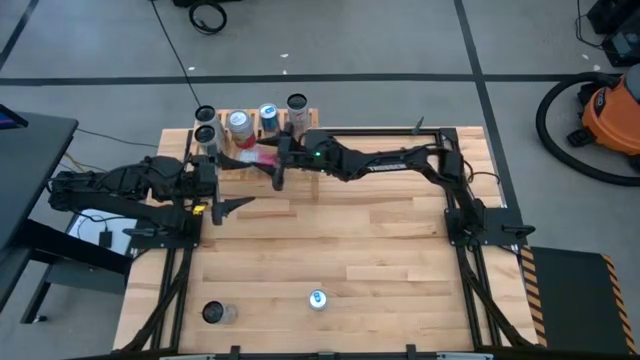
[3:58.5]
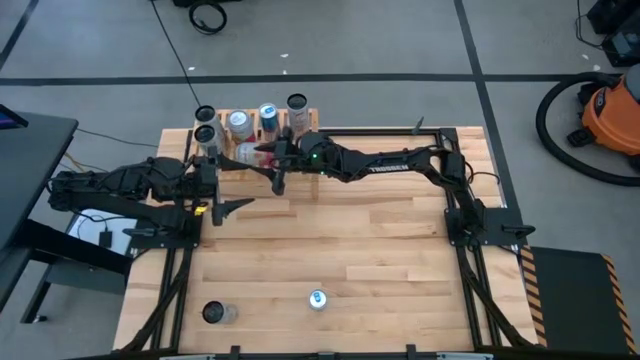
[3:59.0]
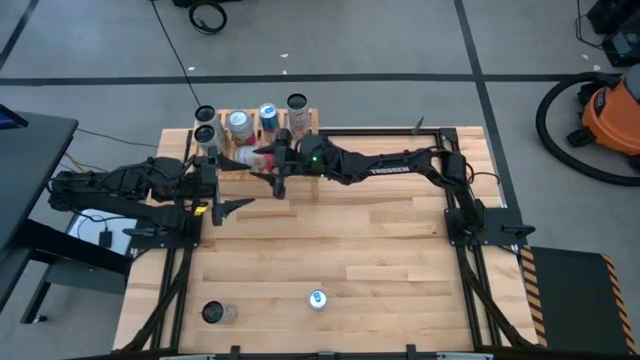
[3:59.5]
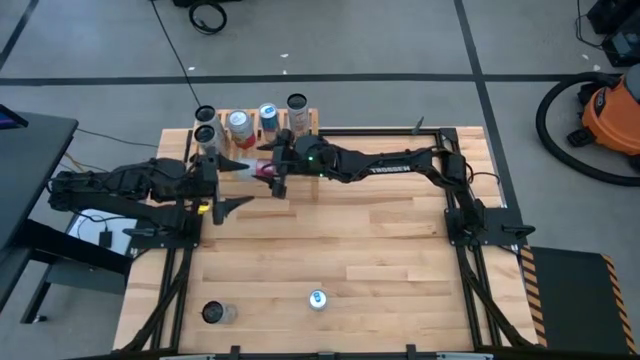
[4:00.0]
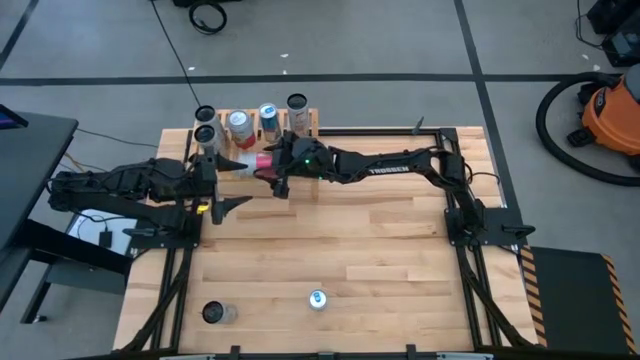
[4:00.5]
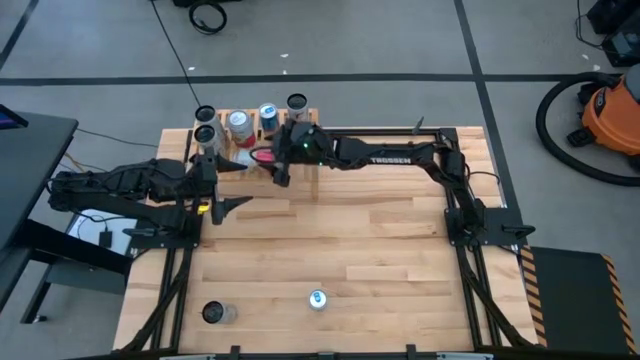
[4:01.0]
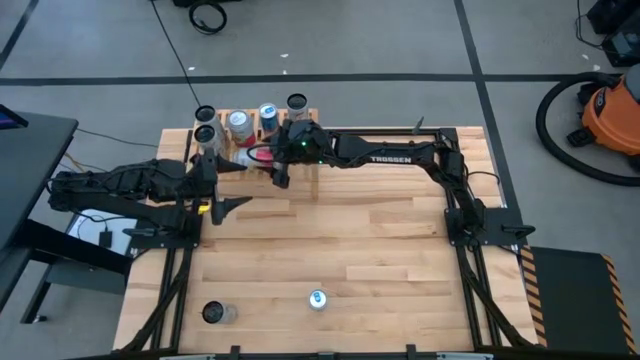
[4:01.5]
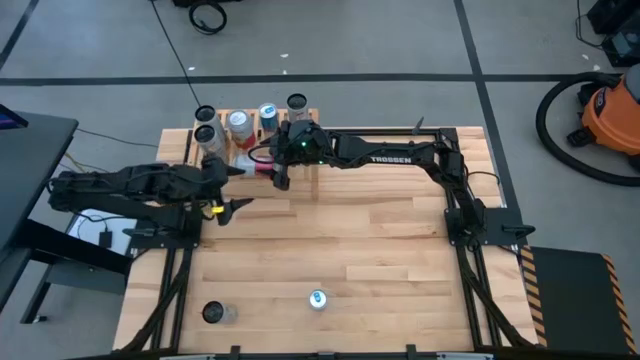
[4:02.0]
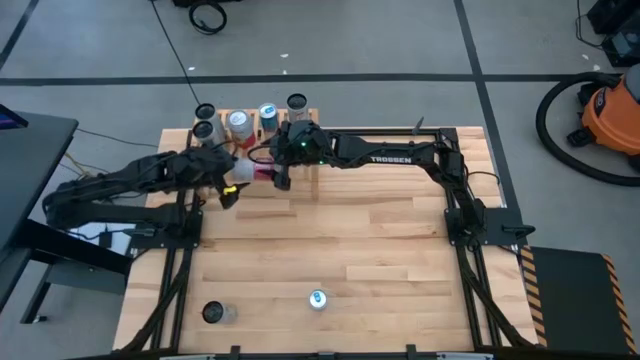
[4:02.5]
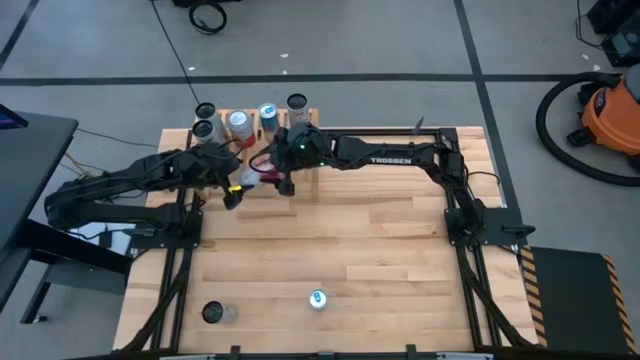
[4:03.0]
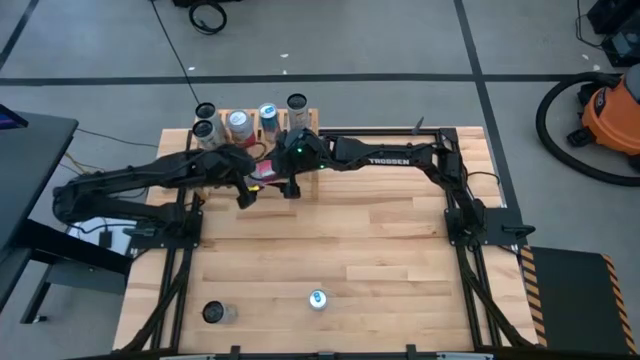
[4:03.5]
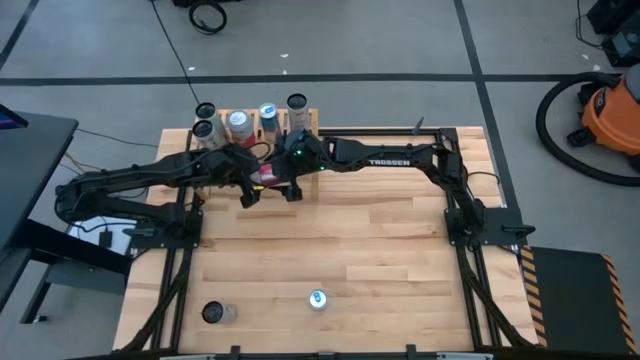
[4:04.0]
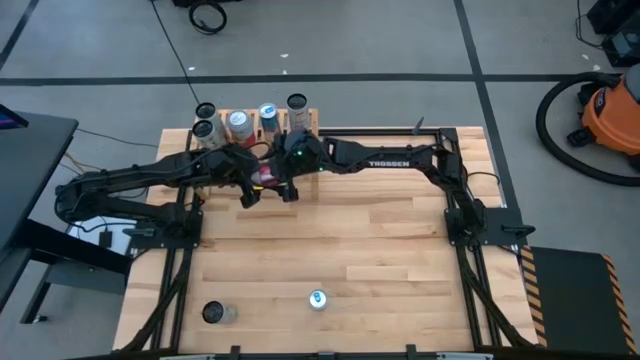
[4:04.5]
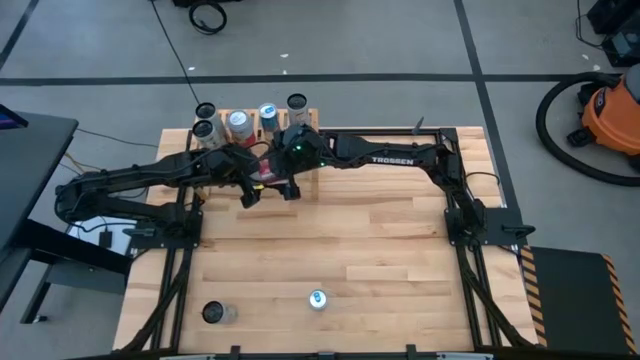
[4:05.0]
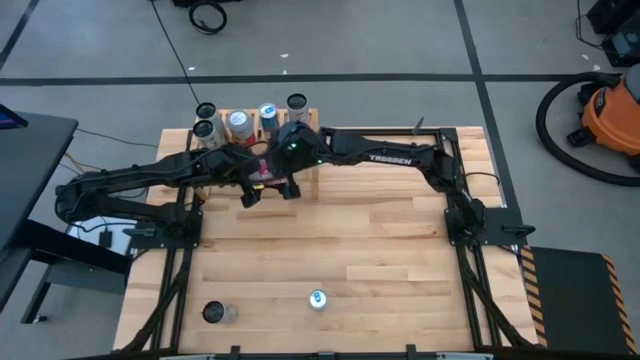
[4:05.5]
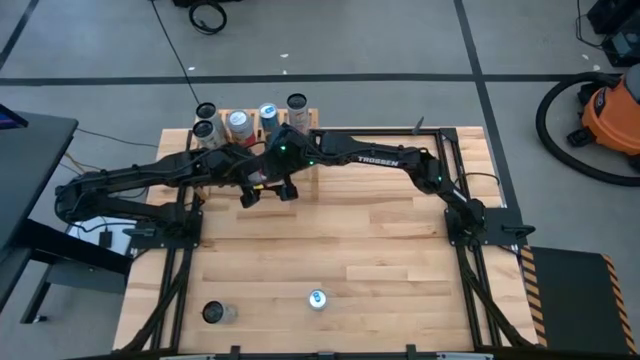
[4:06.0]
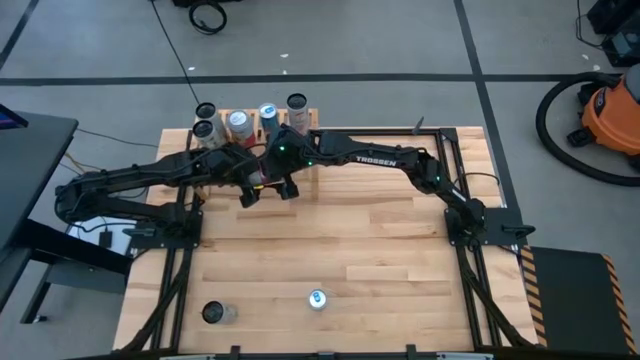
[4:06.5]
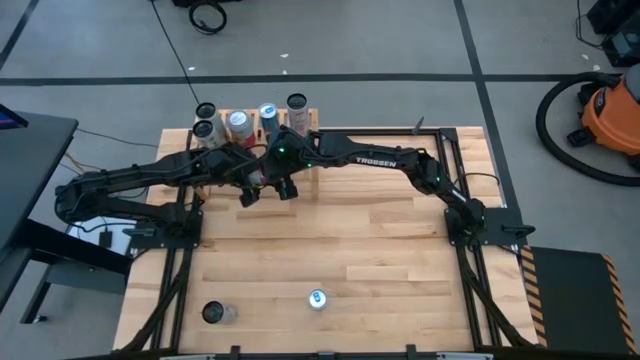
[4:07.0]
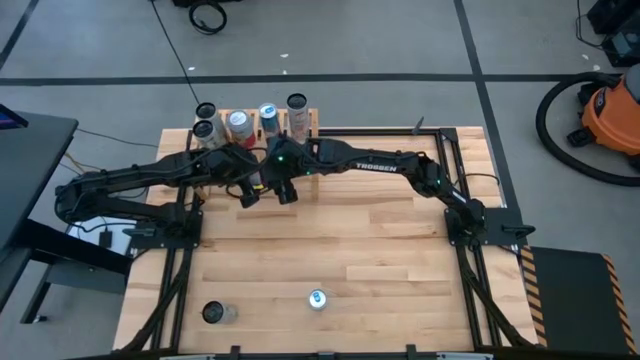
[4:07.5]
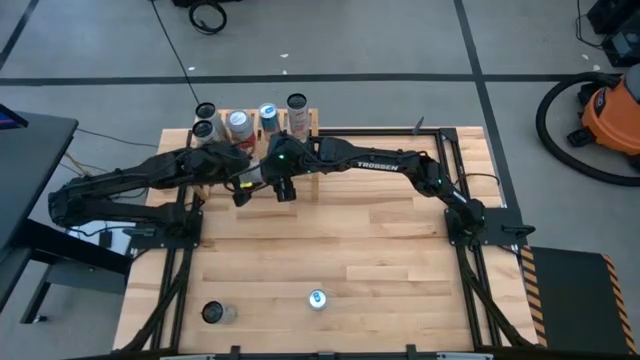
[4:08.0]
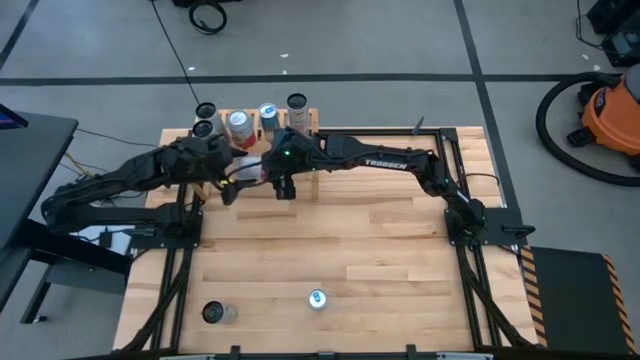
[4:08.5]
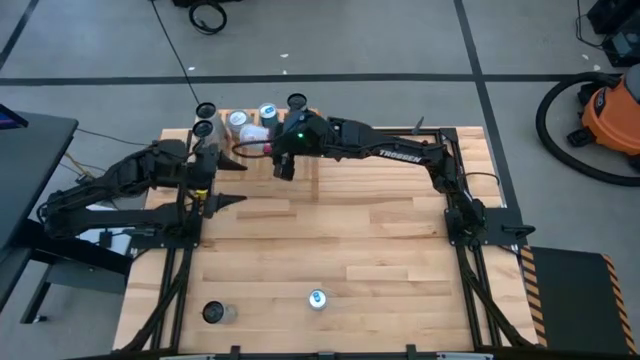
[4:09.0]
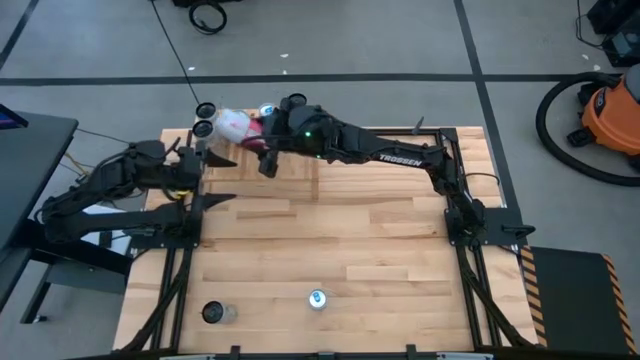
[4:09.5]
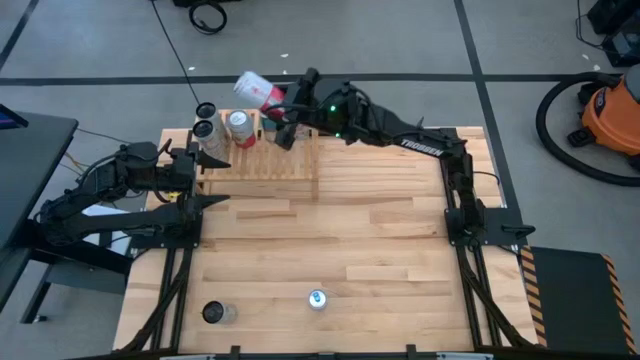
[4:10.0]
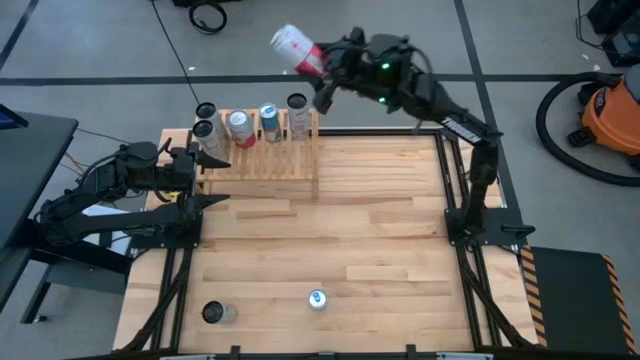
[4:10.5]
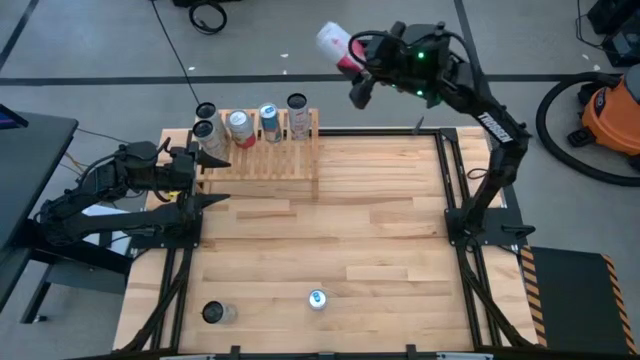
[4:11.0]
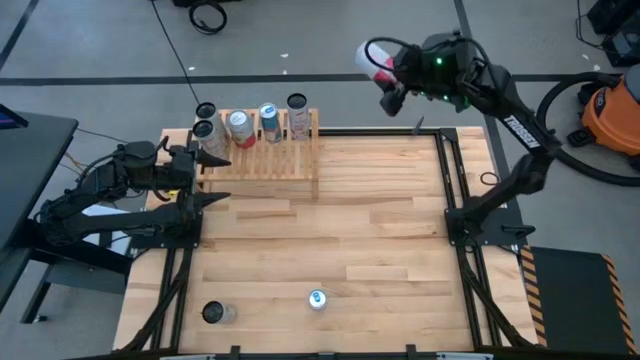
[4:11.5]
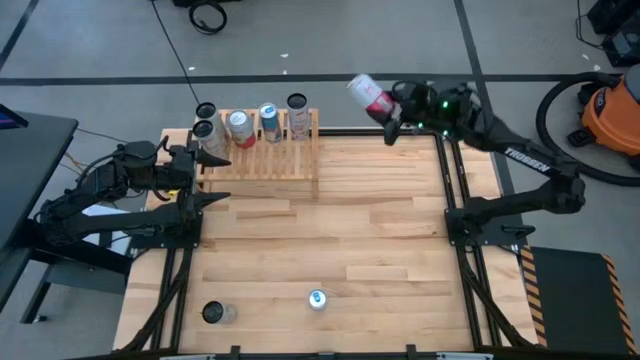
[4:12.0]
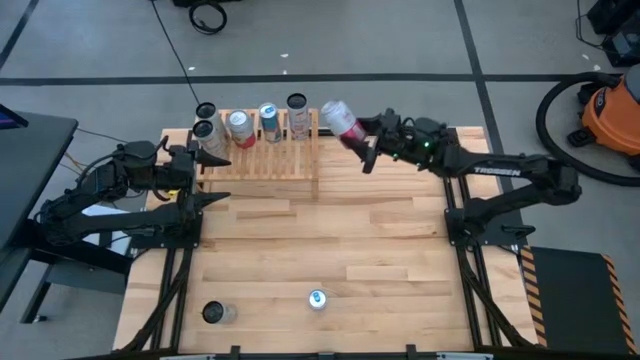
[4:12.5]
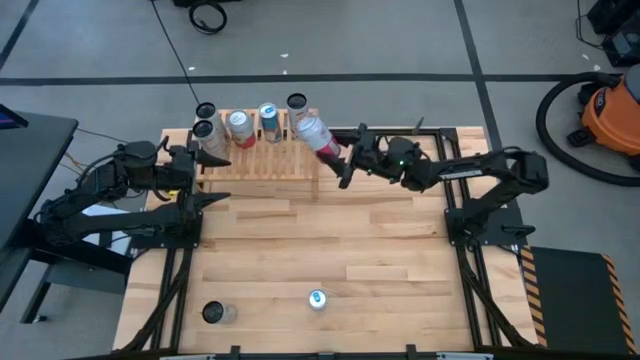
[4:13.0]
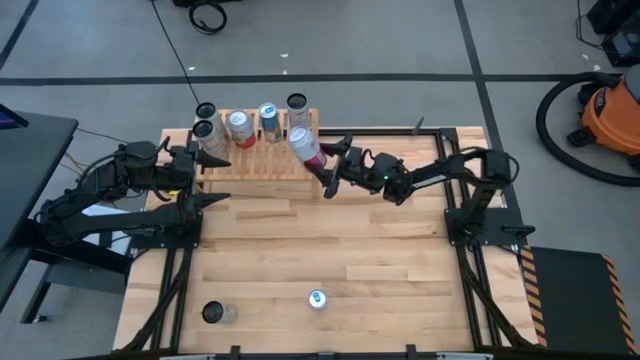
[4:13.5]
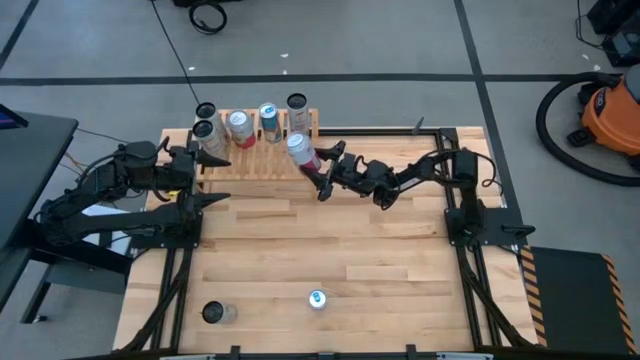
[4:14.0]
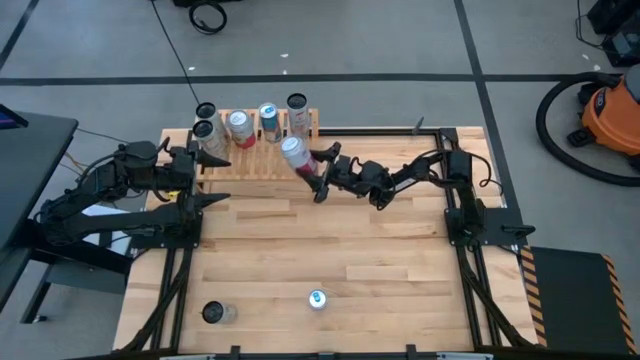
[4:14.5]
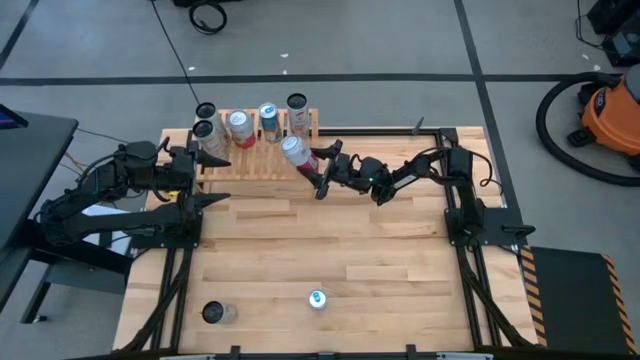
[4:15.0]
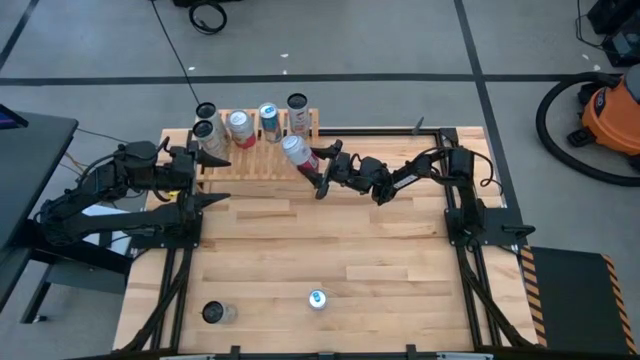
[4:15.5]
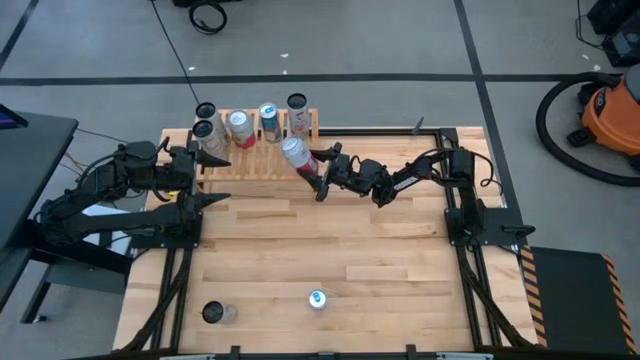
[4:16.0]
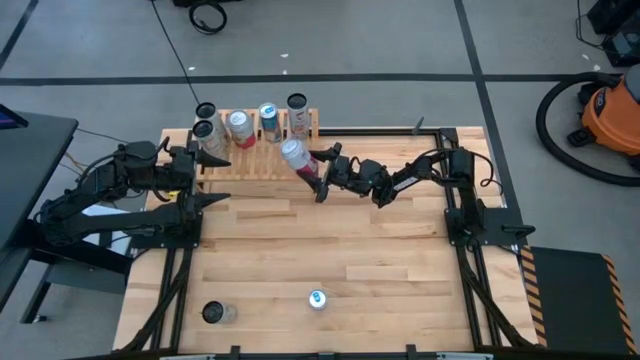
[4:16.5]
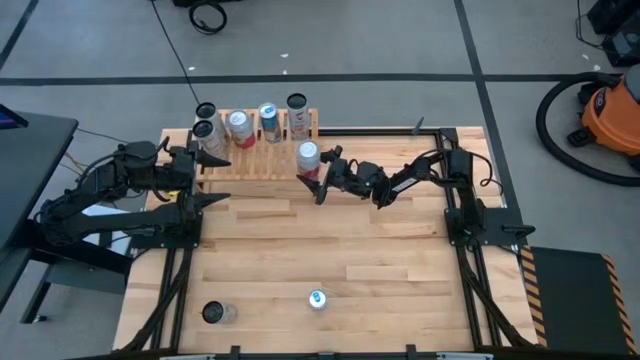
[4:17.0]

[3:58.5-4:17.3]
Task: Place canned beverage on shelf
Put the pink white soda can on the shelf aligned with the other pink white soda can

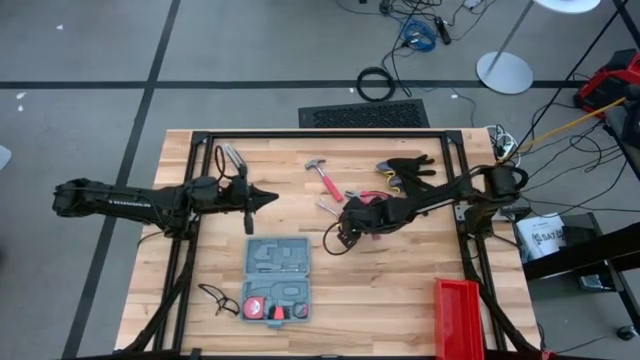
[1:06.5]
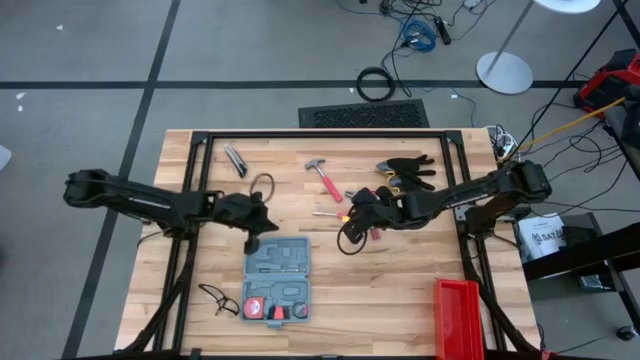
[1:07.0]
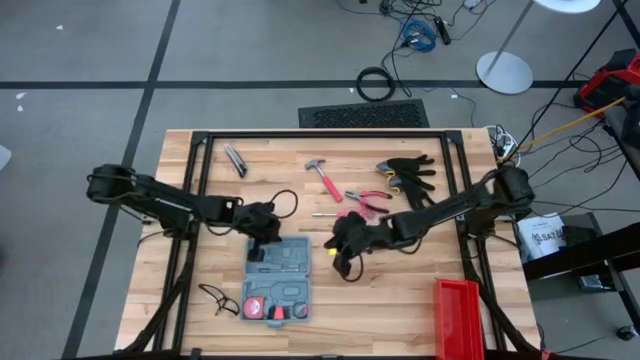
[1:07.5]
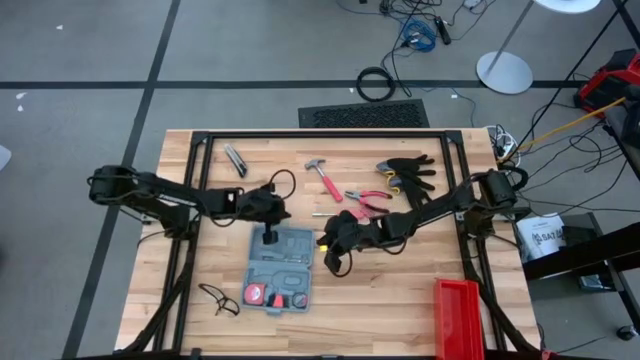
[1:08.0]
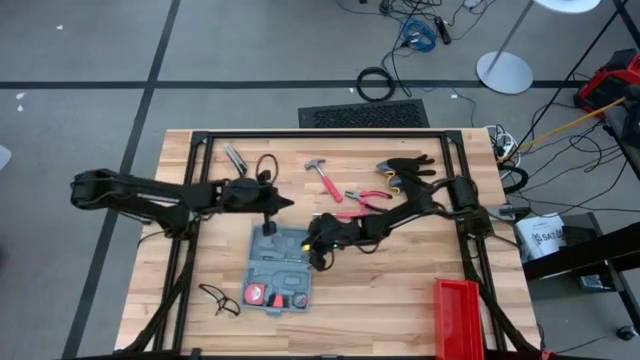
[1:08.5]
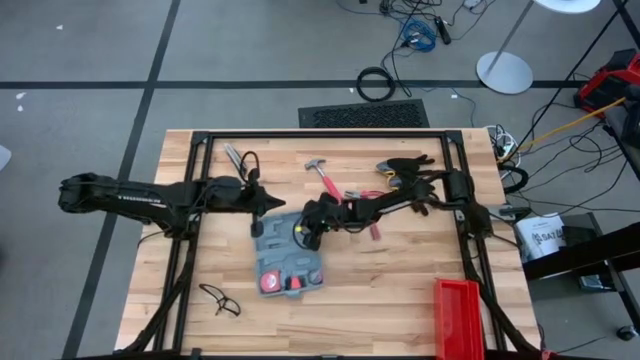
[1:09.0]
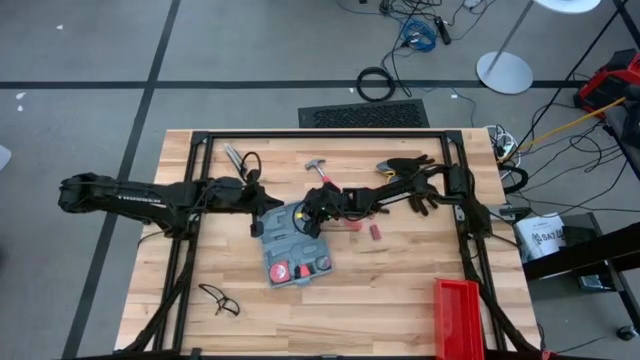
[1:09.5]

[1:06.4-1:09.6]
Task: prefit tool cases
Adjust the gray prefit tool case
